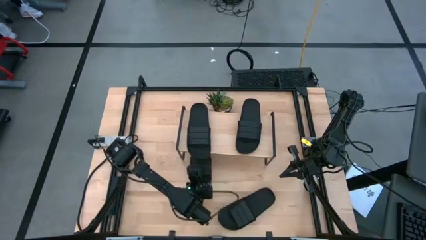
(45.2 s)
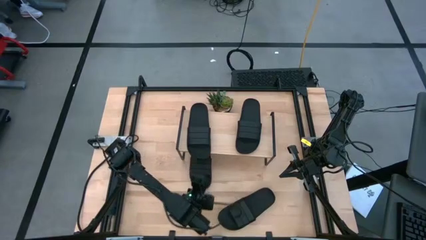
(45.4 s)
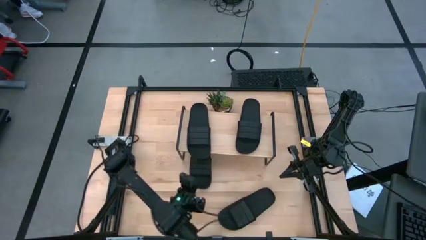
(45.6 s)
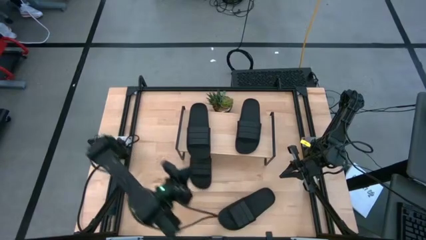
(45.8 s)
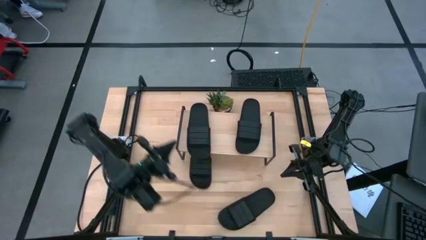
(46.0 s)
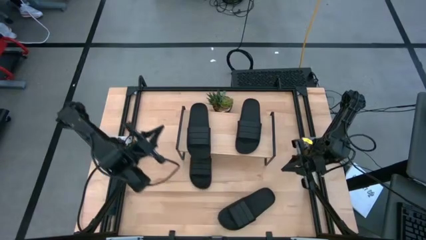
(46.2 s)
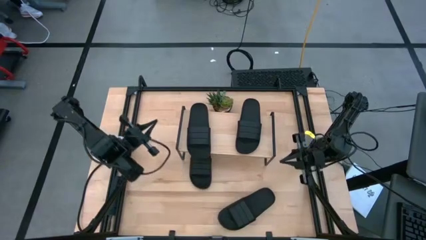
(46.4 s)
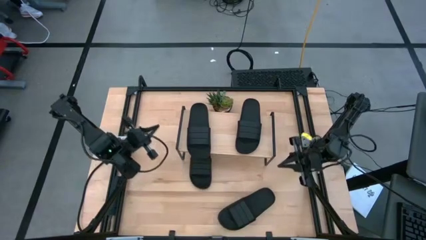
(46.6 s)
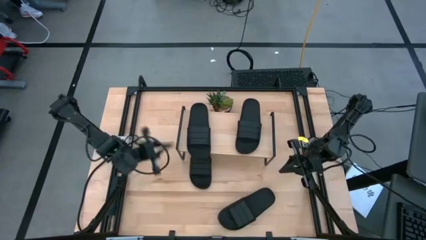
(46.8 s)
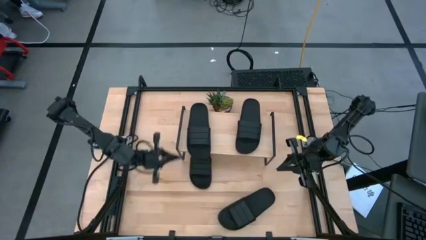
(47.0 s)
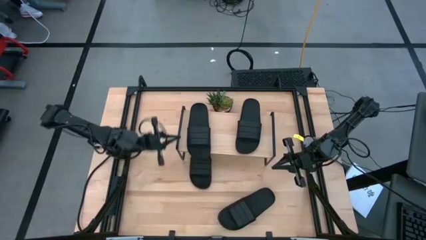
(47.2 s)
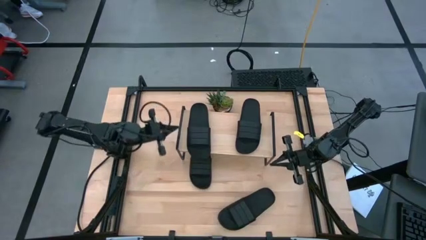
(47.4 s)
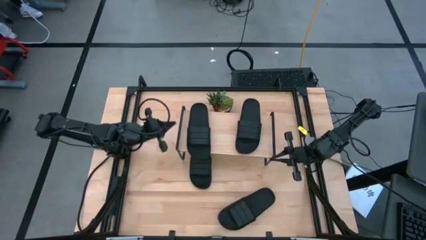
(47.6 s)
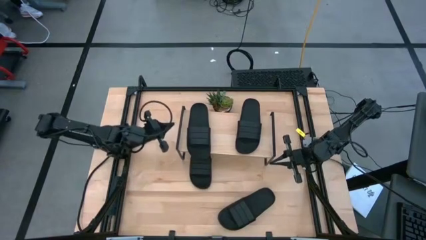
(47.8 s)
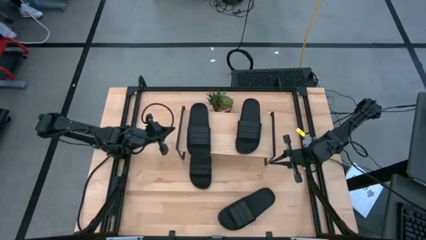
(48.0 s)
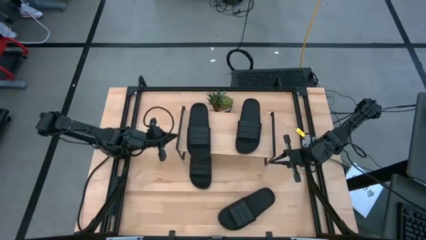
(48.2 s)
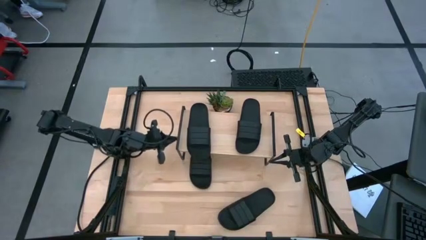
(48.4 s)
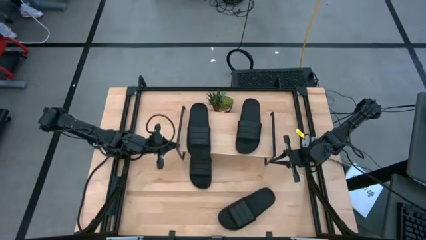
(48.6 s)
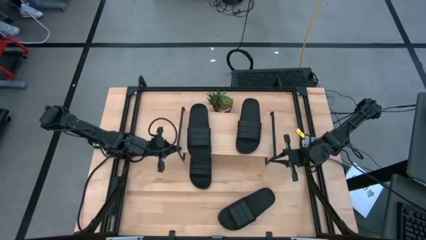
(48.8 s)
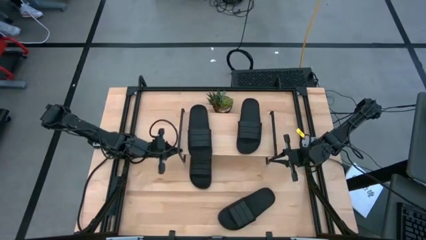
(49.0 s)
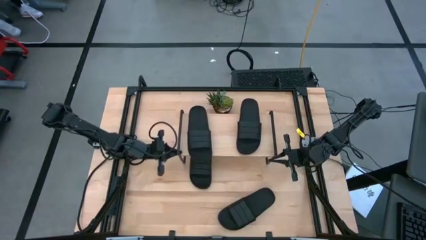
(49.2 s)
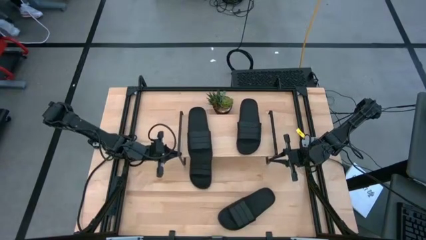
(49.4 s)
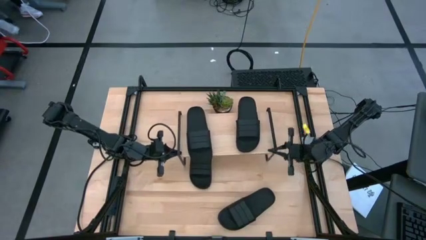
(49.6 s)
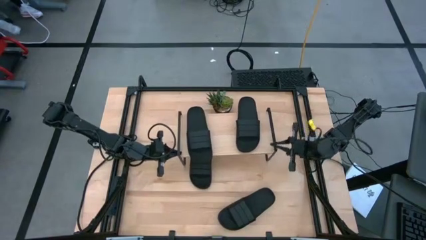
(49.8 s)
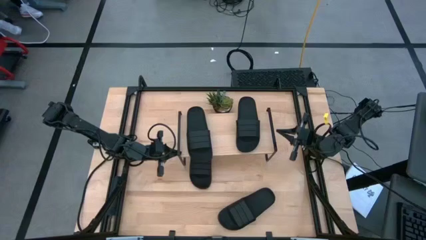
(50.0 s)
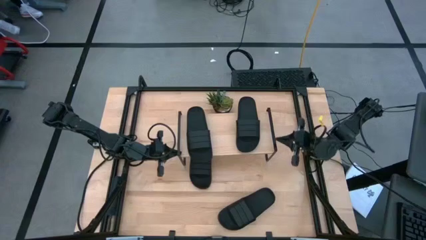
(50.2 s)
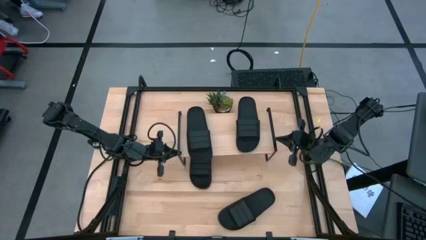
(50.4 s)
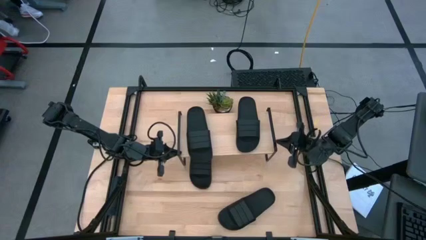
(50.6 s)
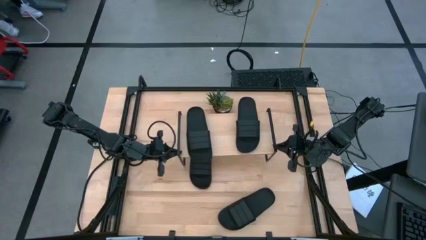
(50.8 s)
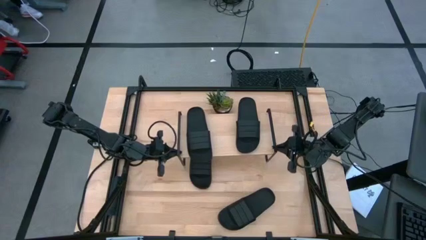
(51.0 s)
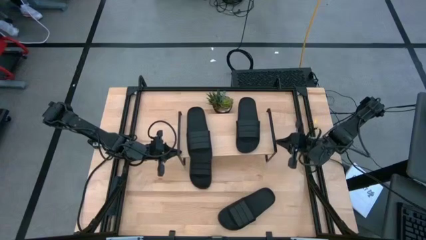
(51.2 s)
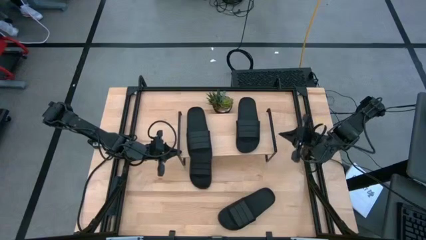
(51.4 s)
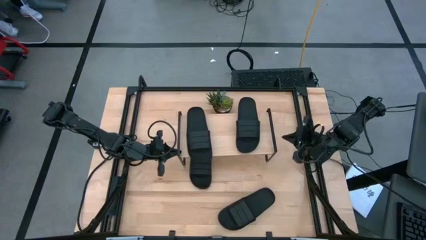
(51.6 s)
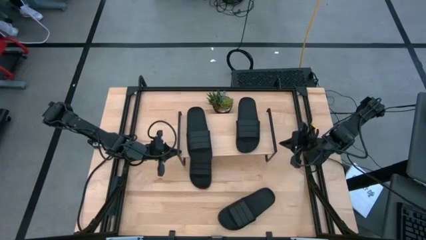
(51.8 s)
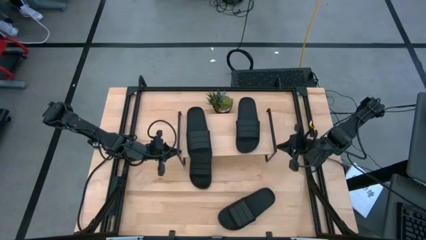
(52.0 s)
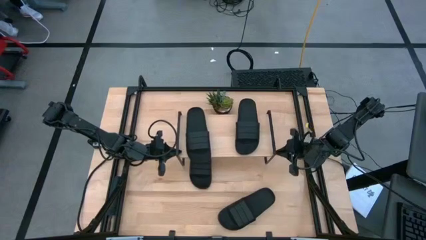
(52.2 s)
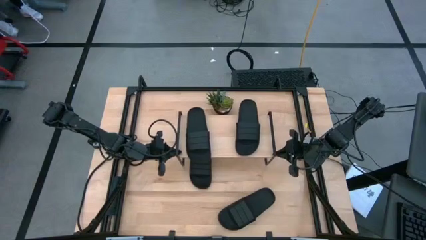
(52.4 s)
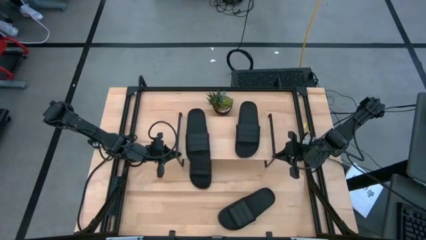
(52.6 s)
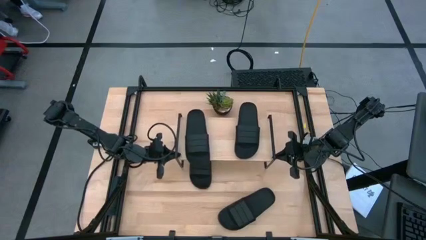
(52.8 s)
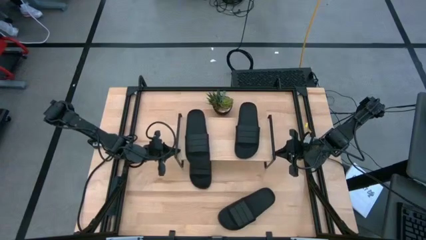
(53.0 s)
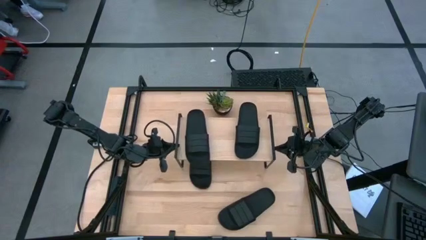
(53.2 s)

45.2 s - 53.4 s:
Task: Pick and place slides into the shelf
Adjust the shelf
